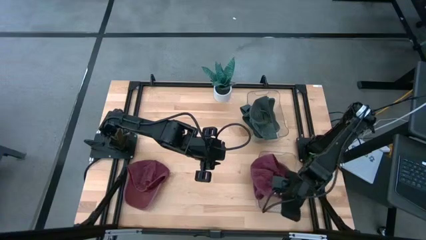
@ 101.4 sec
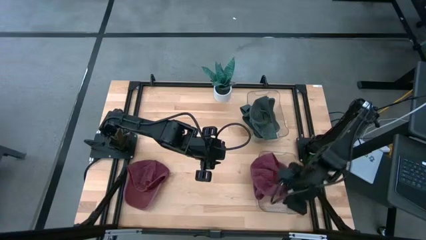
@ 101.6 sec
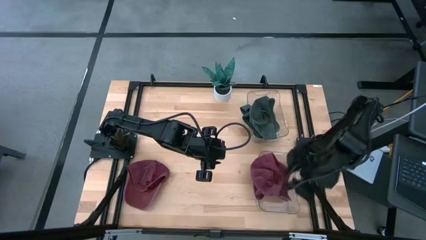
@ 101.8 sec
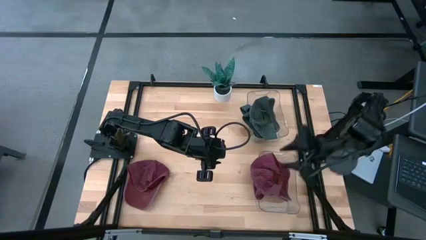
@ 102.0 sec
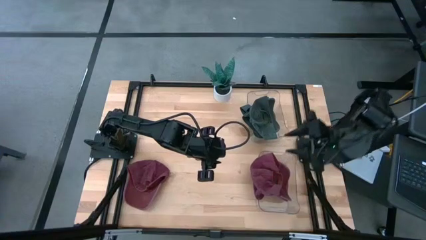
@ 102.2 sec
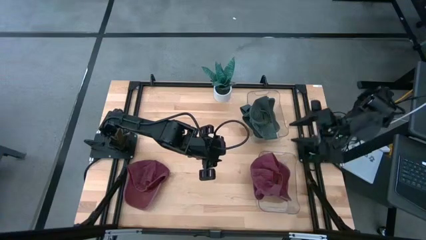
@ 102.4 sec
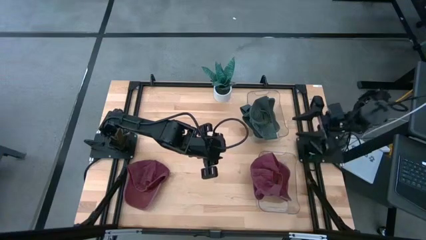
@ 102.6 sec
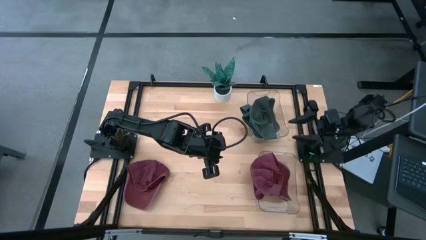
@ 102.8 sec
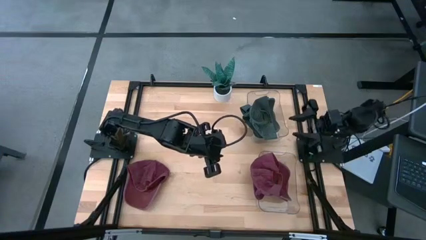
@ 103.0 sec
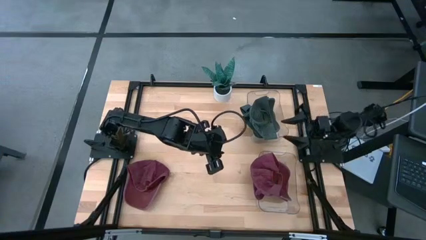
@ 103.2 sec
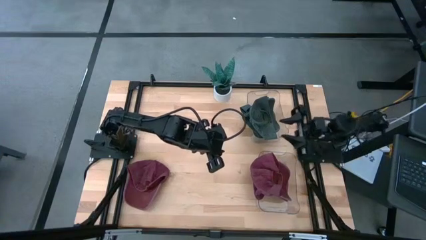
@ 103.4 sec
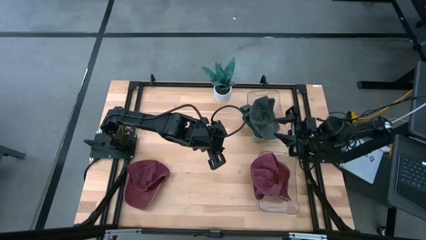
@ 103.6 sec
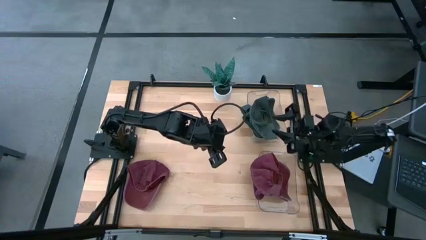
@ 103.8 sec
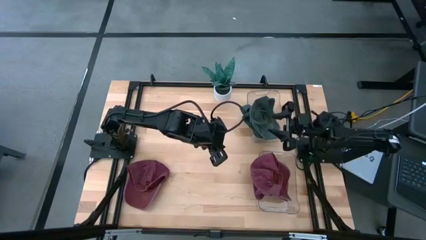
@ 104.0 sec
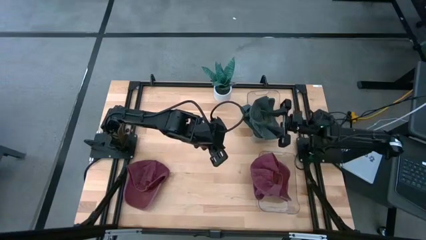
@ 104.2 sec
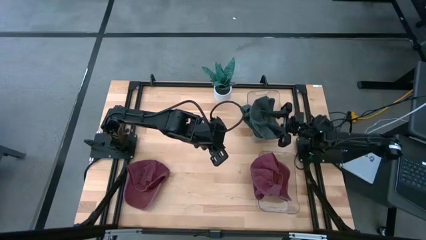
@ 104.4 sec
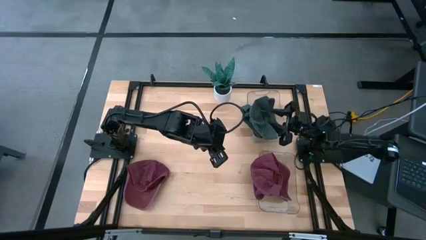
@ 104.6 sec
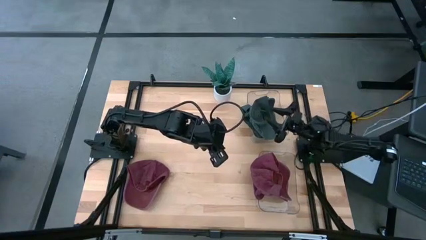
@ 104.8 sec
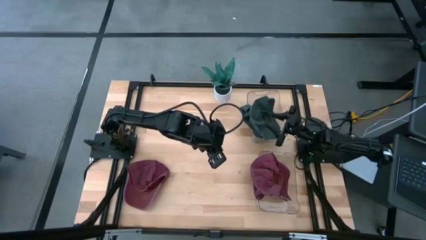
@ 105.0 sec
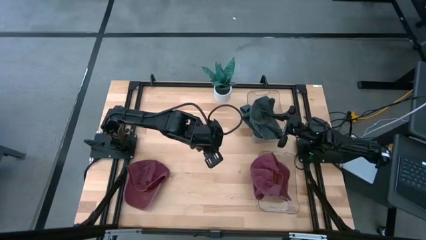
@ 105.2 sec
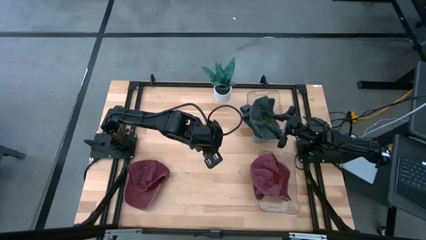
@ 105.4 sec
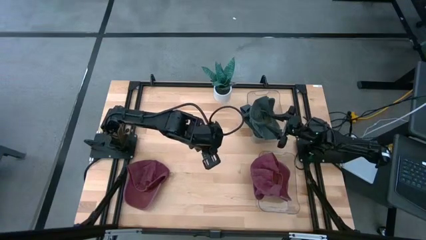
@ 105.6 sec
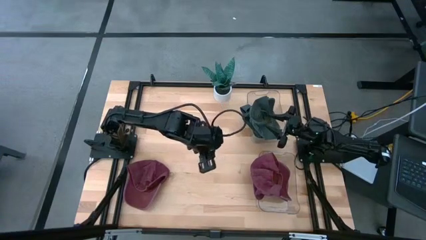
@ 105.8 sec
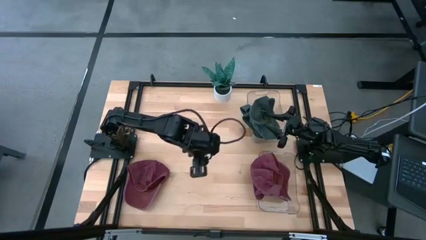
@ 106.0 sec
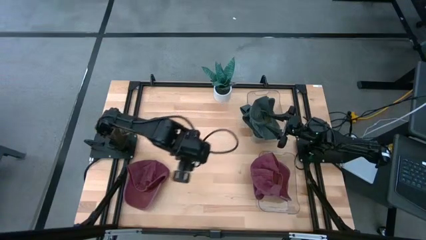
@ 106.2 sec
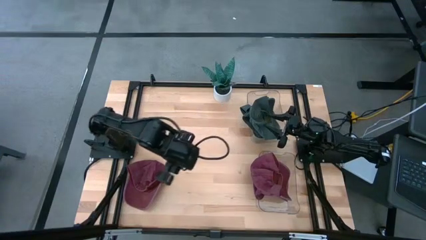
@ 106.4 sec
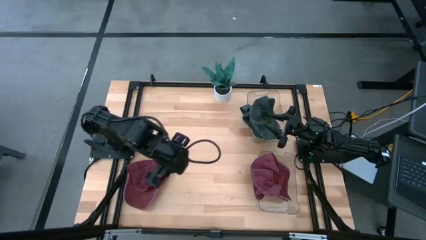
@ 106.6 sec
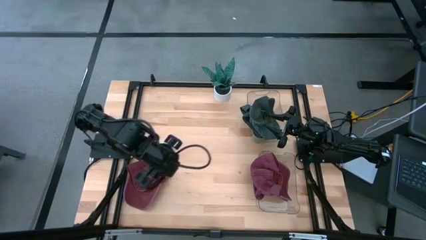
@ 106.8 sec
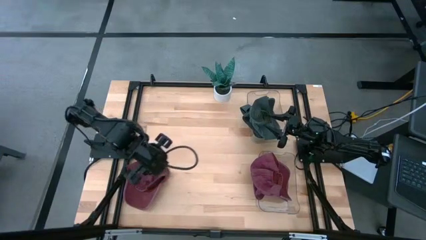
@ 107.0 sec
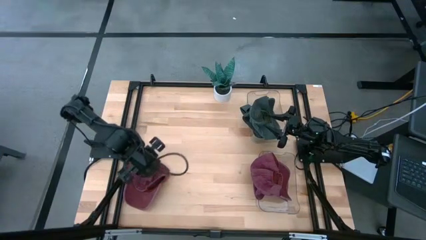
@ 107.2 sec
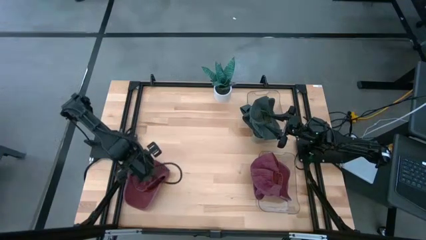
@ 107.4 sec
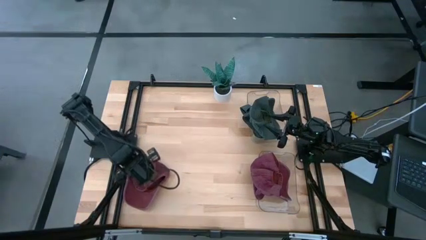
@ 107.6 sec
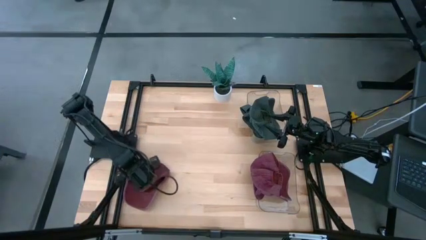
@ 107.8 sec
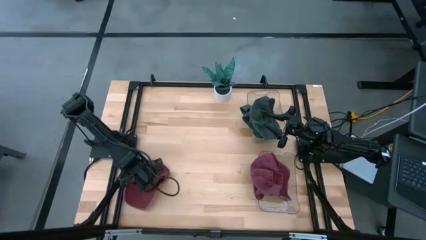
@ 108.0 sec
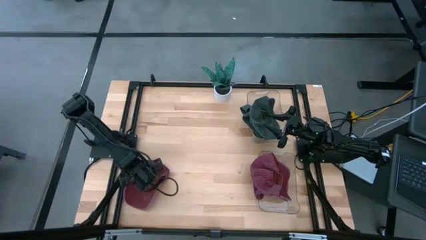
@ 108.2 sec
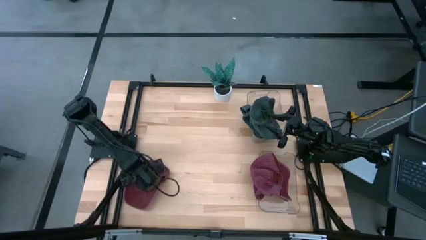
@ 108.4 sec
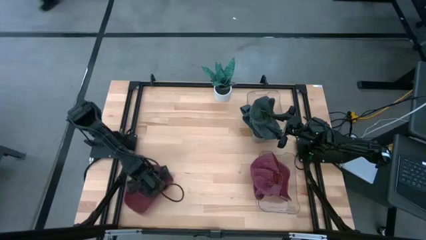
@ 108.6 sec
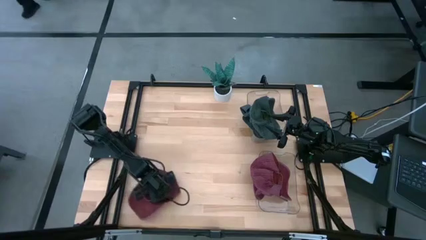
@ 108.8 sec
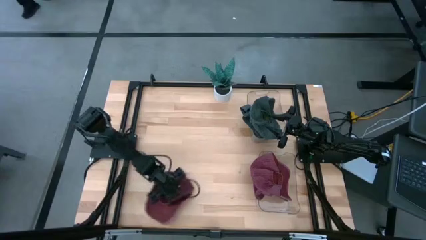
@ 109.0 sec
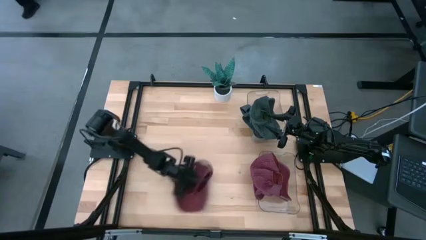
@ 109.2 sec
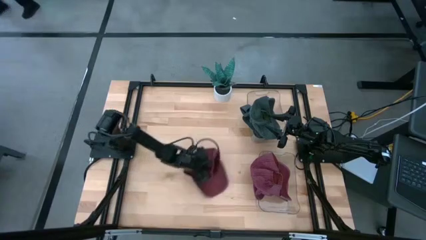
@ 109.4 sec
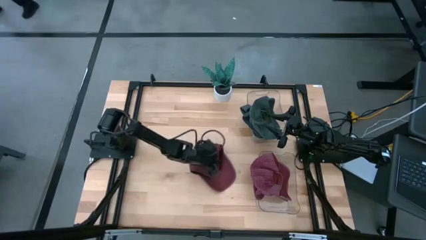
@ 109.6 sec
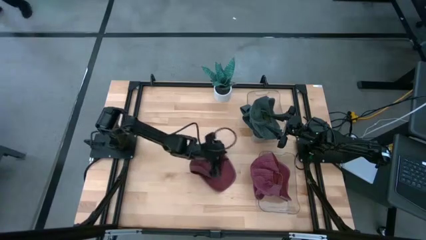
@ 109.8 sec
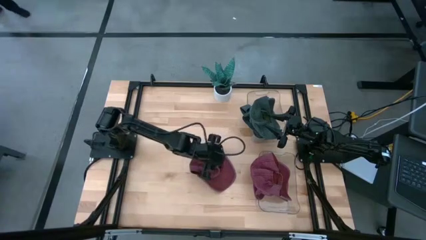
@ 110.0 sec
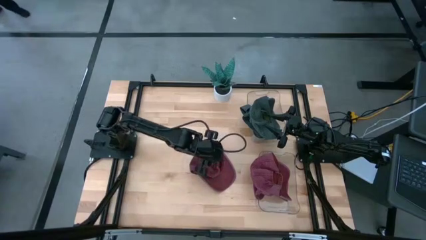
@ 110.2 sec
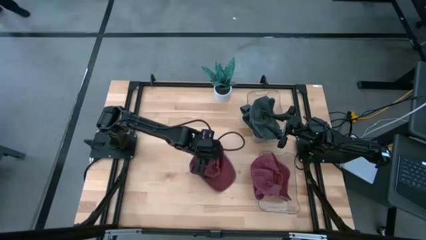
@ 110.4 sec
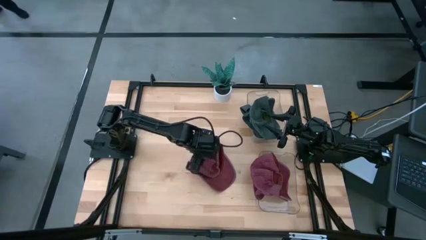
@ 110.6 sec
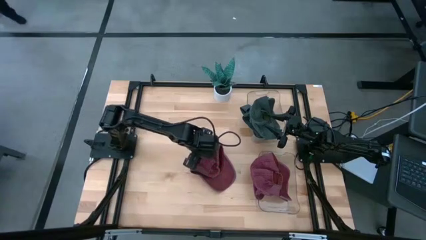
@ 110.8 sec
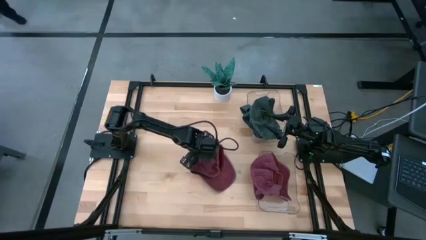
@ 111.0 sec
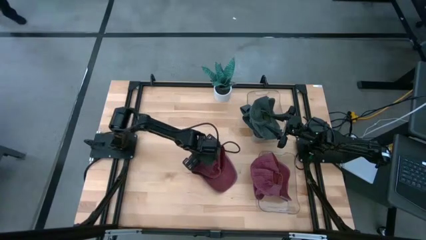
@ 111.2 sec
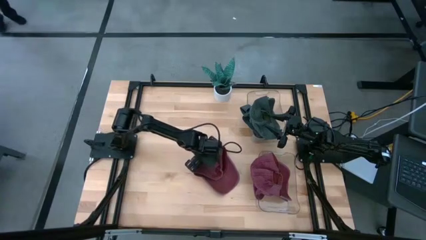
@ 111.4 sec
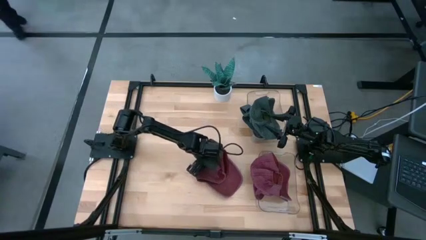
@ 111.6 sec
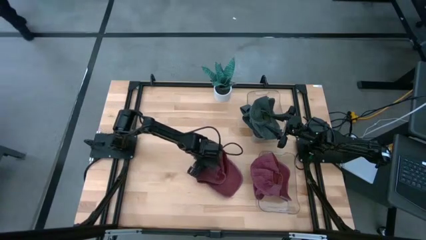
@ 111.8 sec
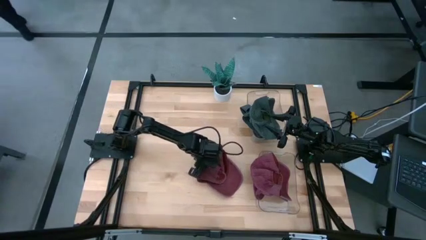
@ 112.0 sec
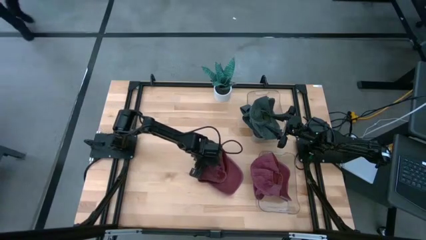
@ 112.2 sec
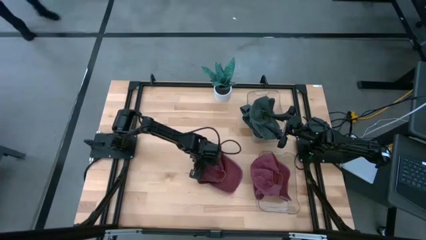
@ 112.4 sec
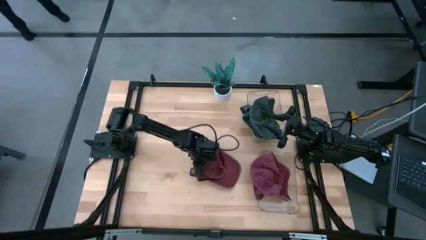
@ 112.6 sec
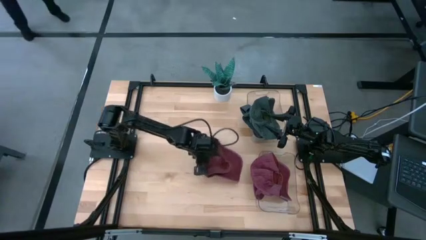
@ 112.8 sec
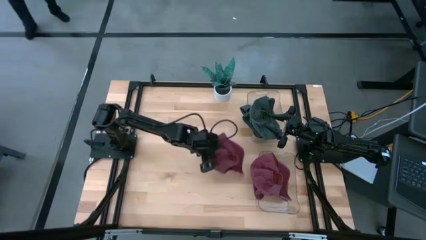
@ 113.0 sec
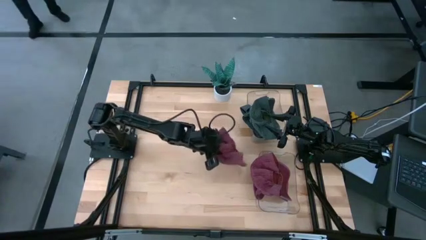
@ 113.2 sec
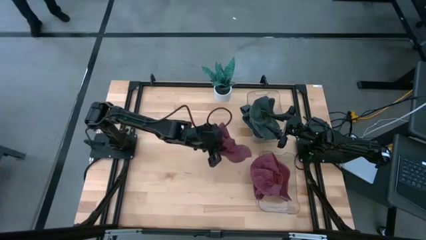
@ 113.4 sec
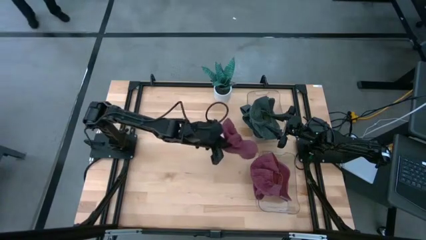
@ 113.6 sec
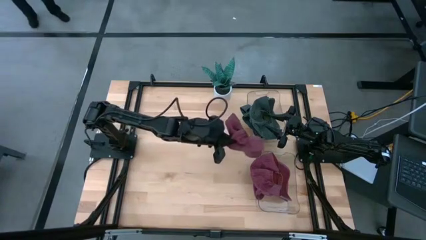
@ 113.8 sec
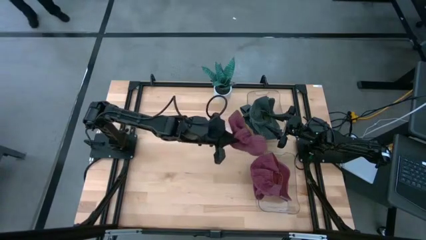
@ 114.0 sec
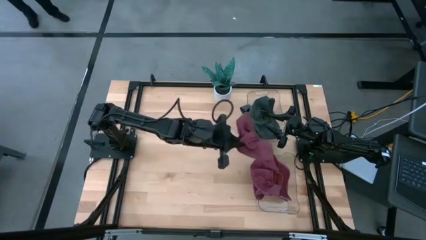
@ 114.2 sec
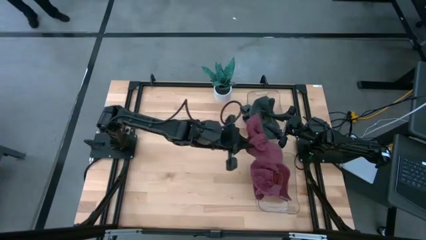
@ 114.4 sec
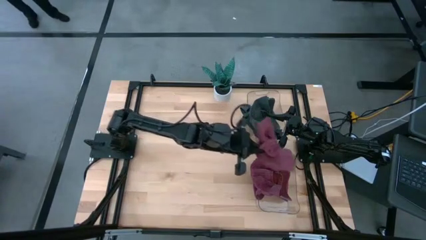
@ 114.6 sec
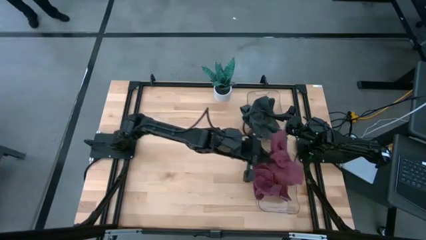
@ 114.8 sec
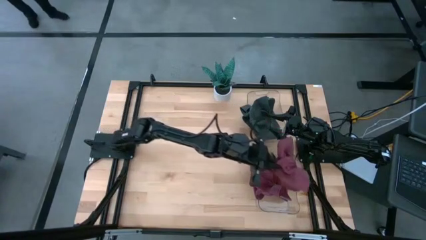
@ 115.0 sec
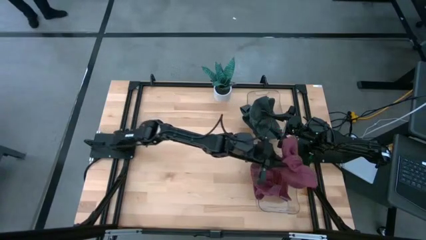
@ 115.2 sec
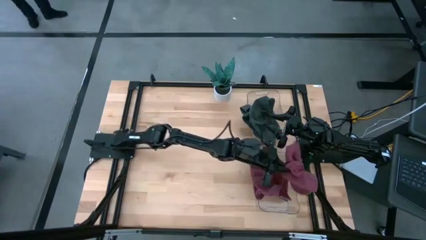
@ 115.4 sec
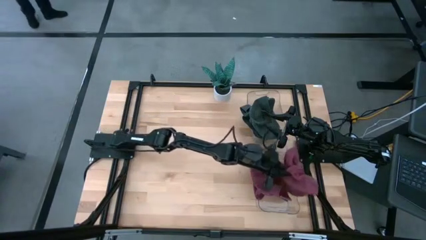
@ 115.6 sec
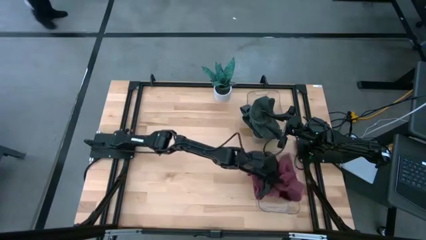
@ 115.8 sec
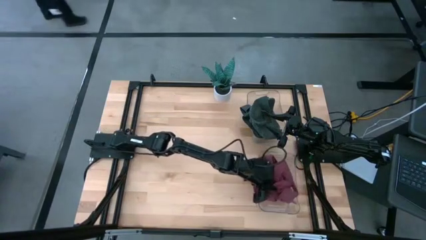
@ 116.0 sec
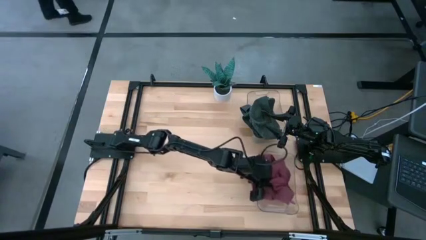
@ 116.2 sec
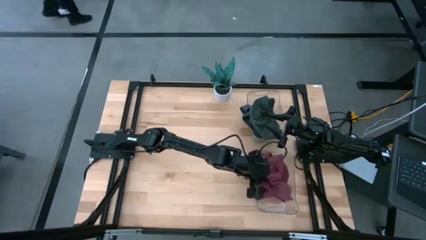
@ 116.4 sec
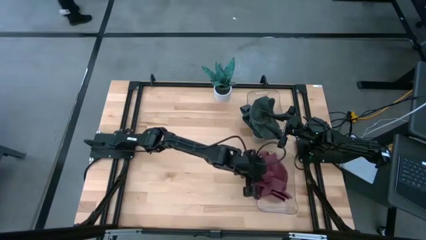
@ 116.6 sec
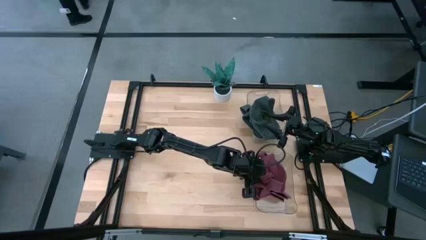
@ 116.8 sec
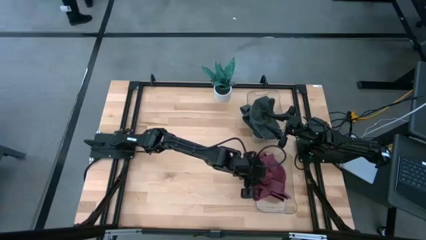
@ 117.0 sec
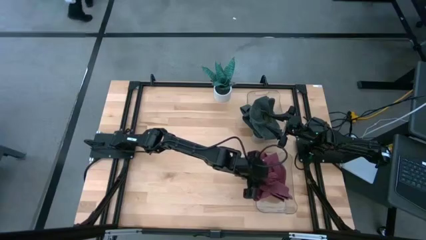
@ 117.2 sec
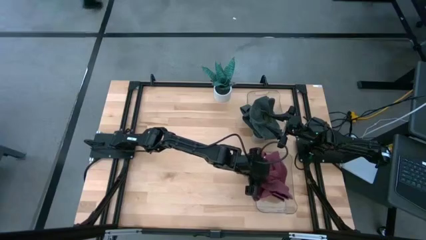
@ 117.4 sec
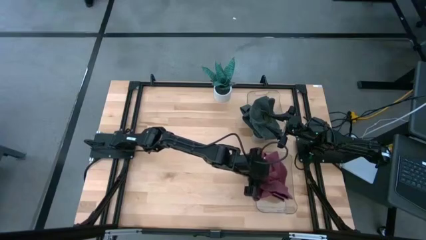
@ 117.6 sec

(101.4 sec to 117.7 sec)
Task: Pick & Place hat
Put the red cap into the bottom transparent bin
